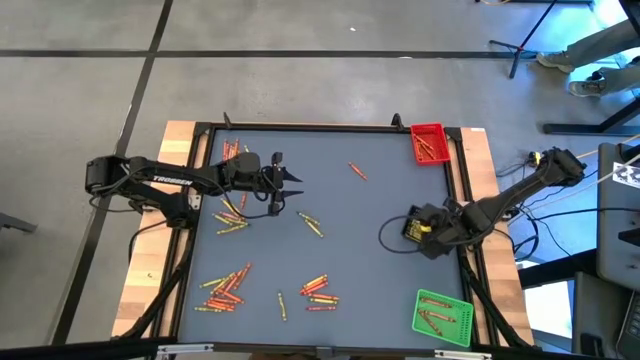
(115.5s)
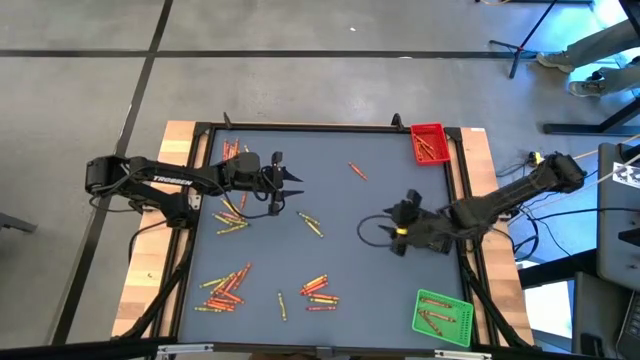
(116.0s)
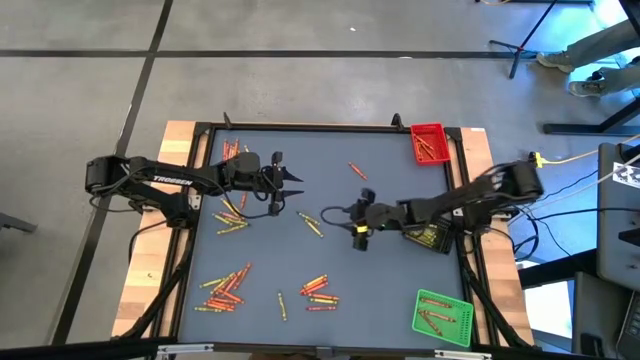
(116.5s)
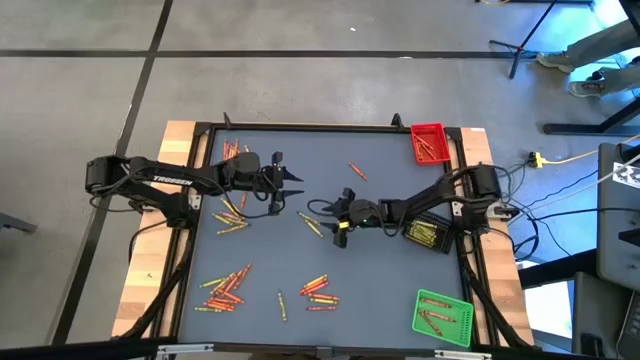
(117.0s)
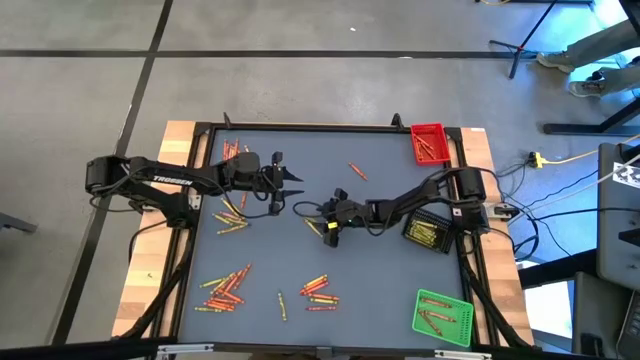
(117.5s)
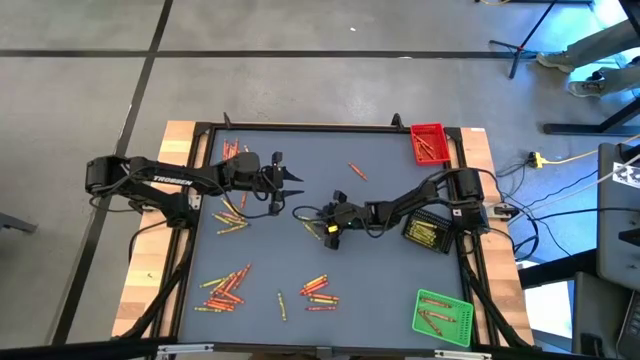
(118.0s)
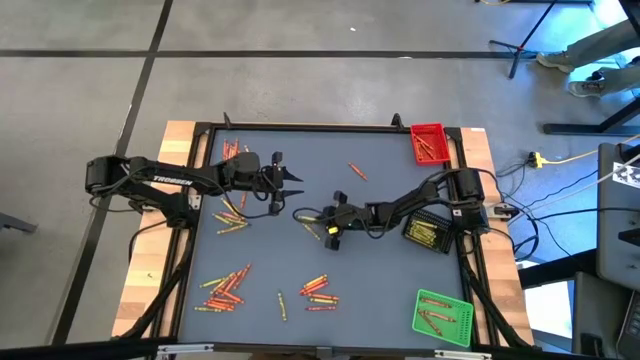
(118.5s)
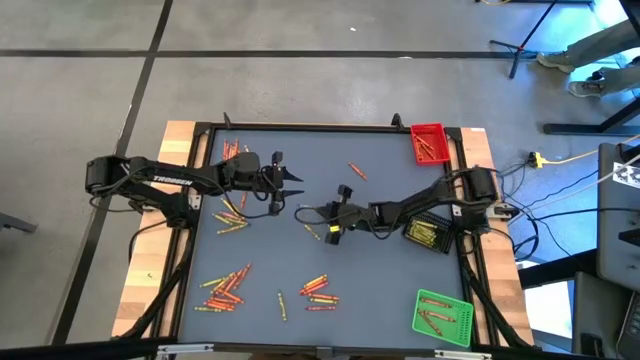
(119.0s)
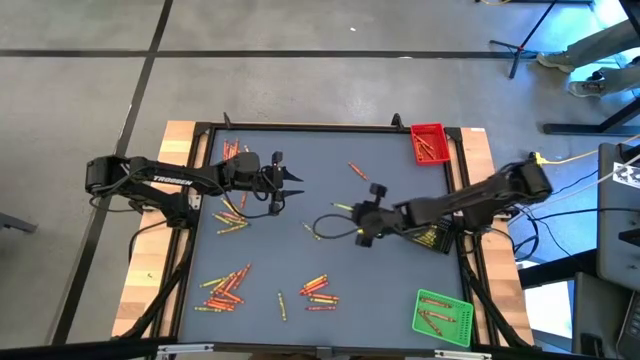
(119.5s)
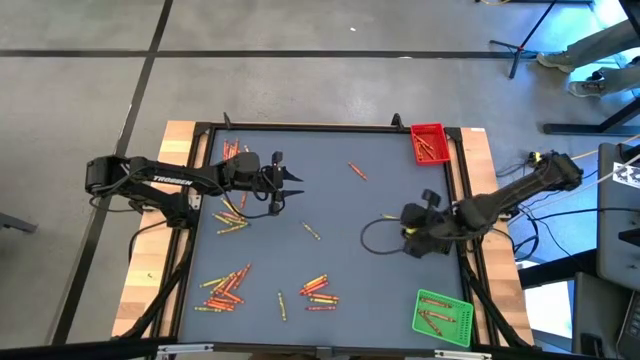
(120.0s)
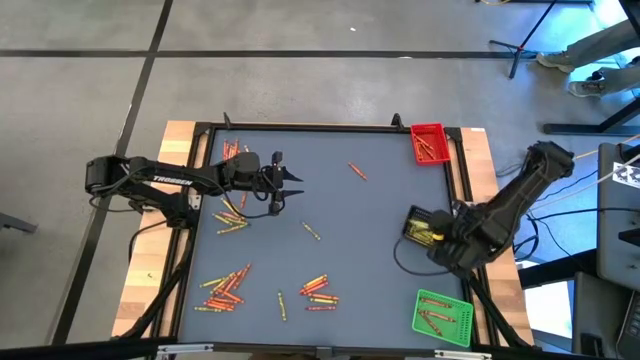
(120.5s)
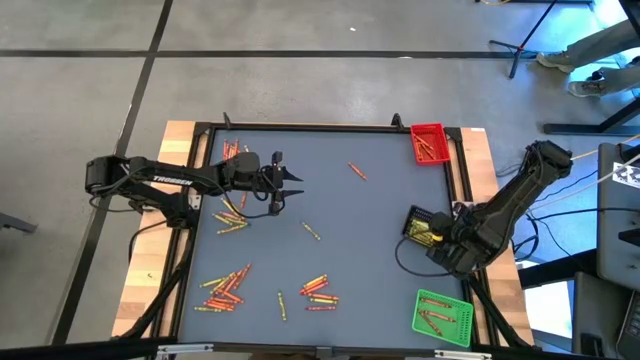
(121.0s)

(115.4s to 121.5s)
Task: Sort crayons
Put the green crayon into the black basket

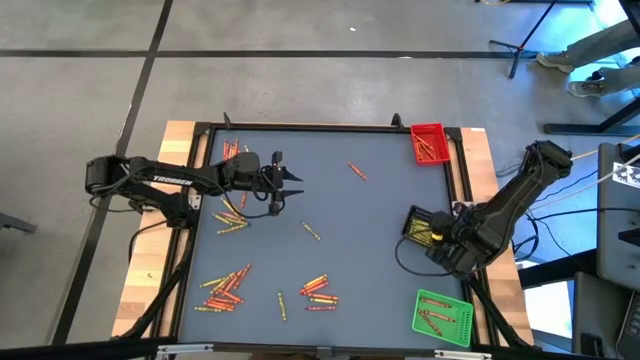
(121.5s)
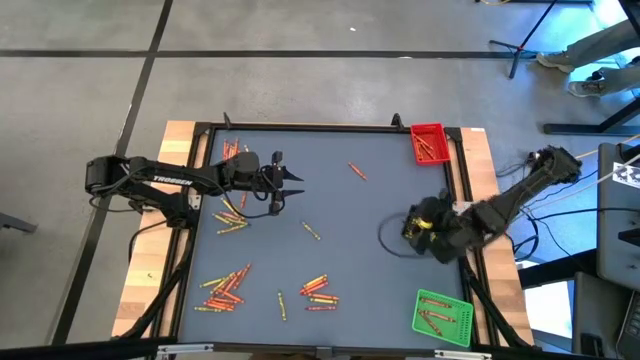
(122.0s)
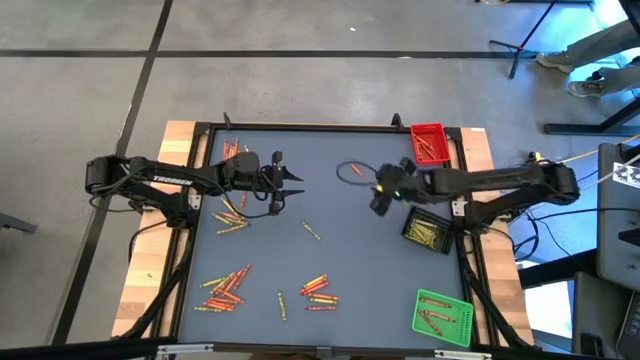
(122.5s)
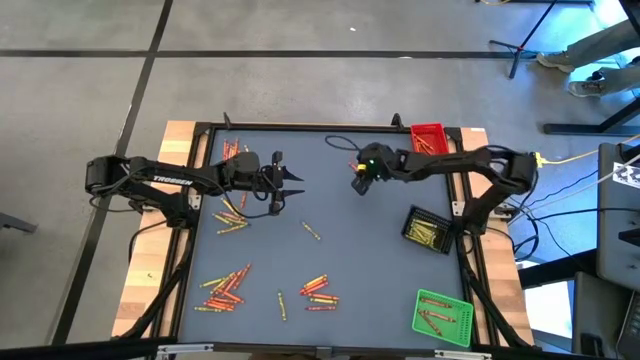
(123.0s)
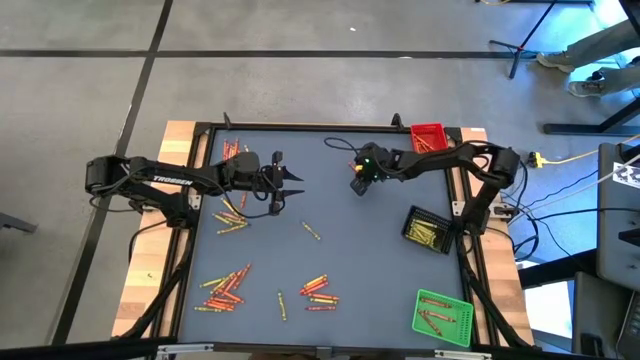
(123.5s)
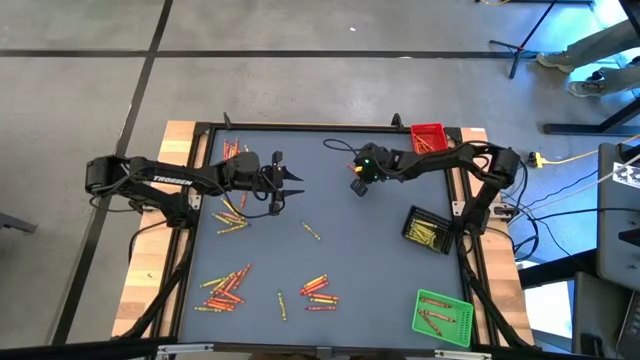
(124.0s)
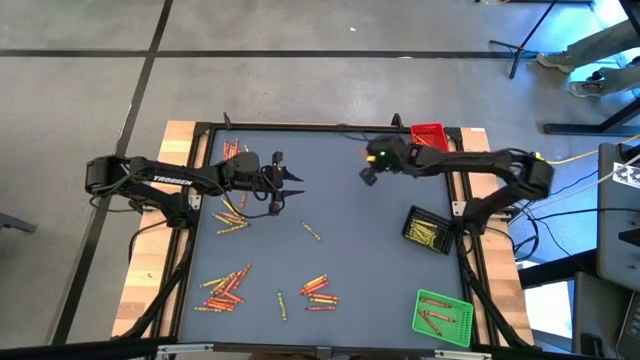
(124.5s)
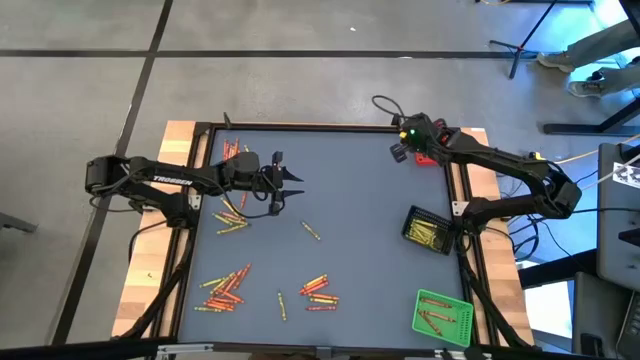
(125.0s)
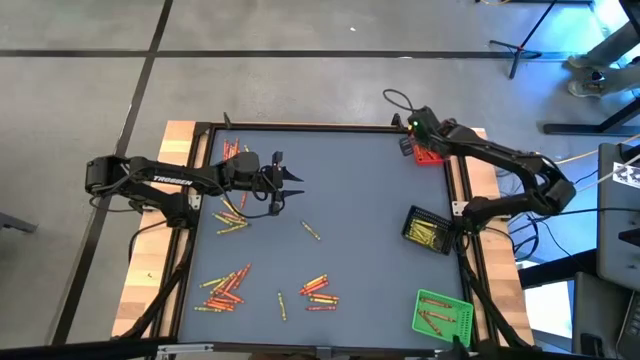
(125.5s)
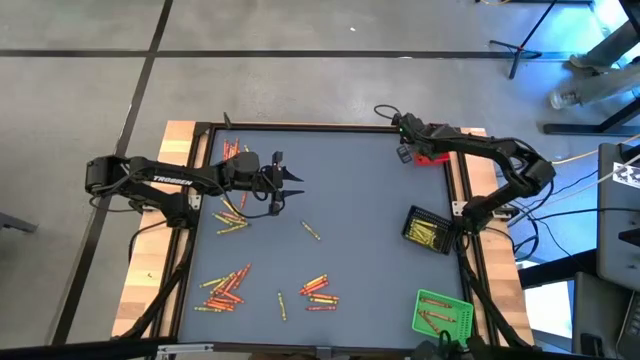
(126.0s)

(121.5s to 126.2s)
Put the orange crayon into the red basket

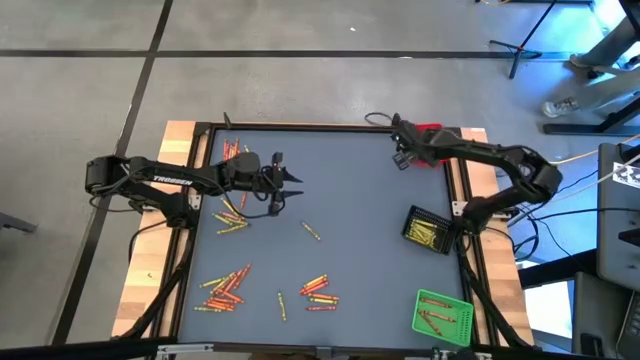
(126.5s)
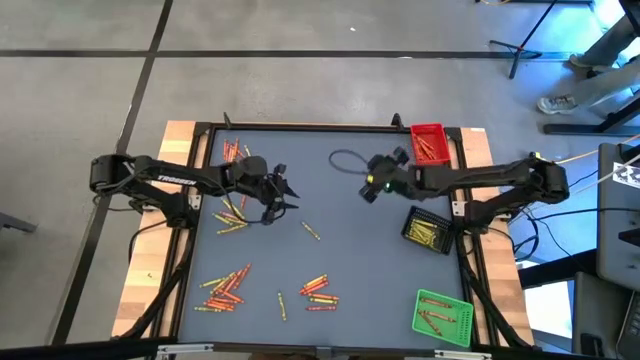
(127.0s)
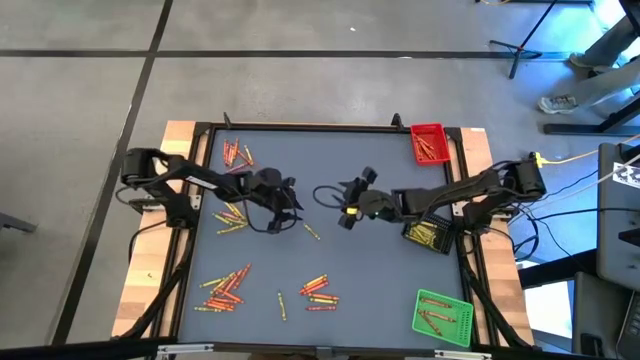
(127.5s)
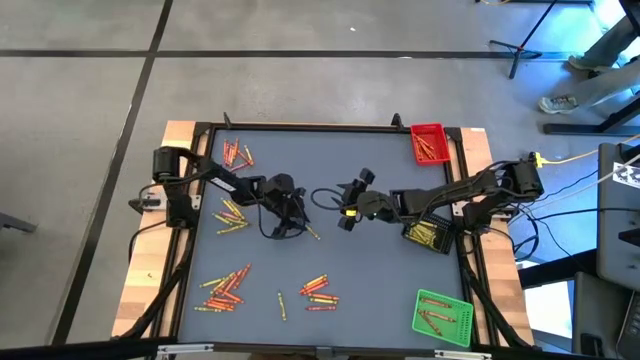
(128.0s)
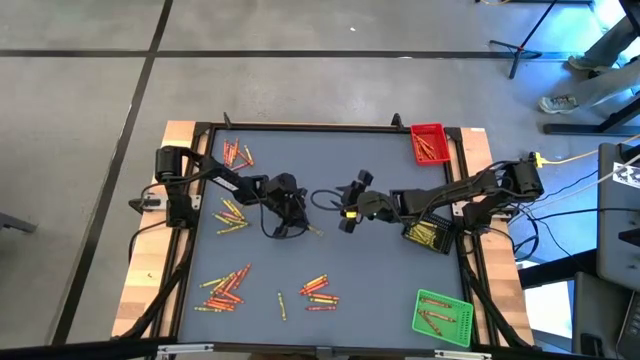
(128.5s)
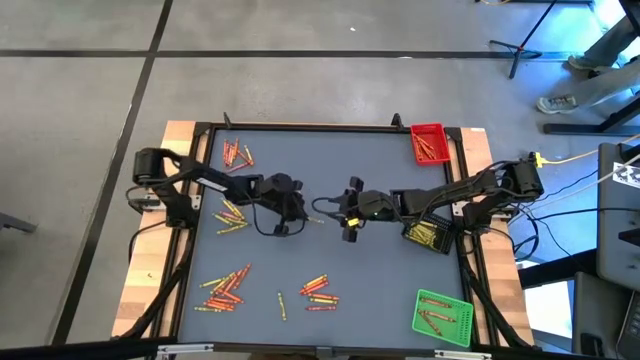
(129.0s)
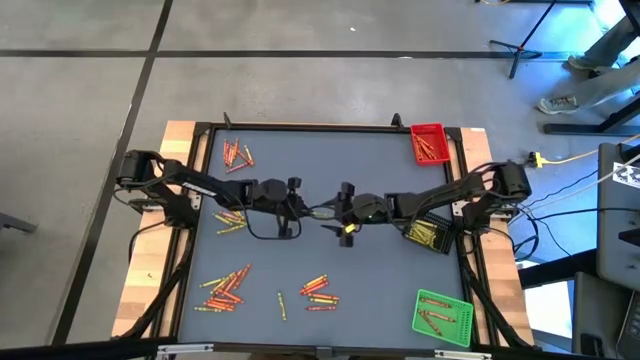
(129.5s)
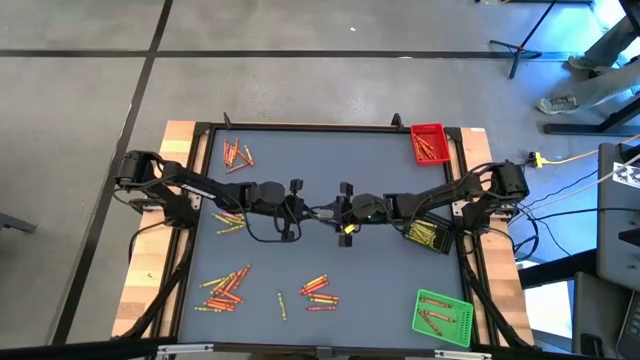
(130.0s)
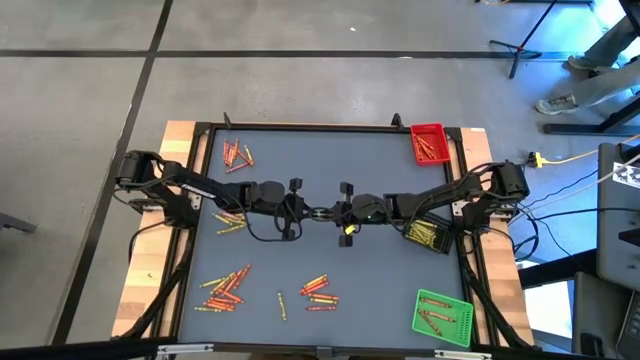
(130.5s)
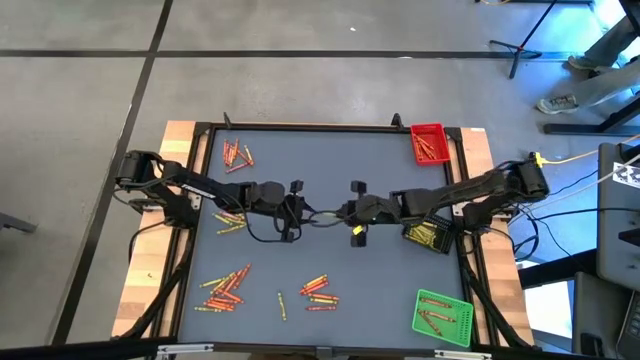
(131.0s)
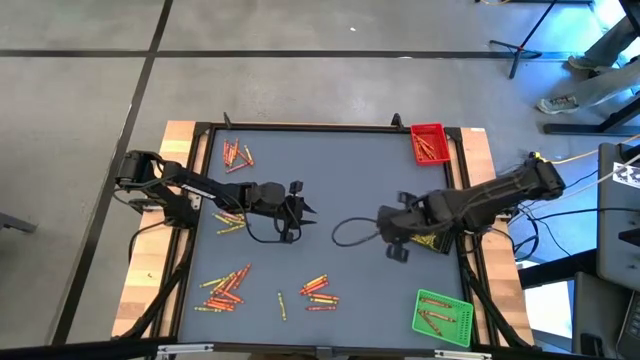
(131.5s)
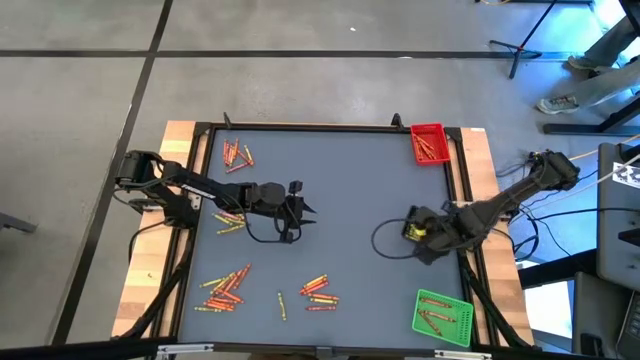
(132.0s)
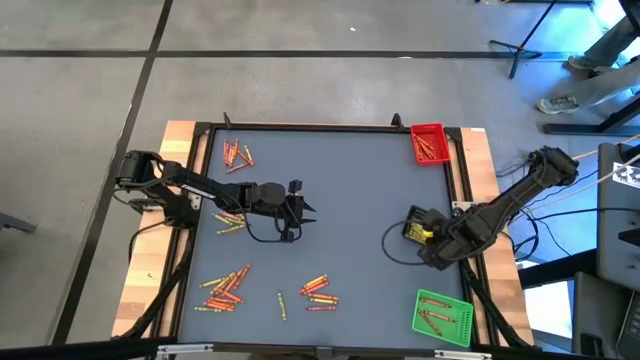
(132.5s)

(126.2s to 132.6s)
Put the green crayon into the black basket

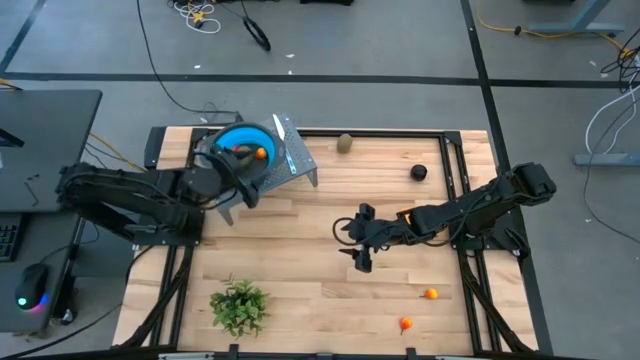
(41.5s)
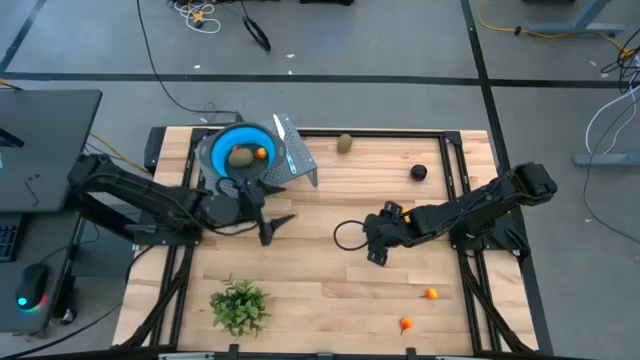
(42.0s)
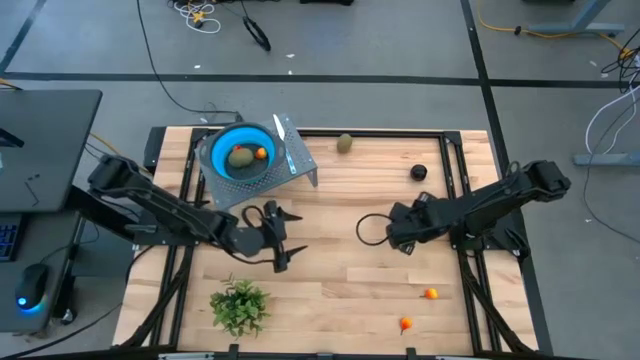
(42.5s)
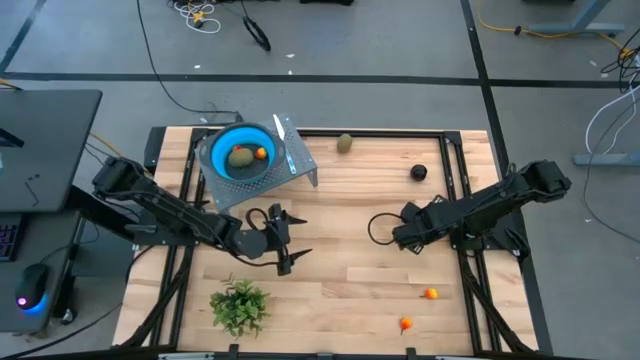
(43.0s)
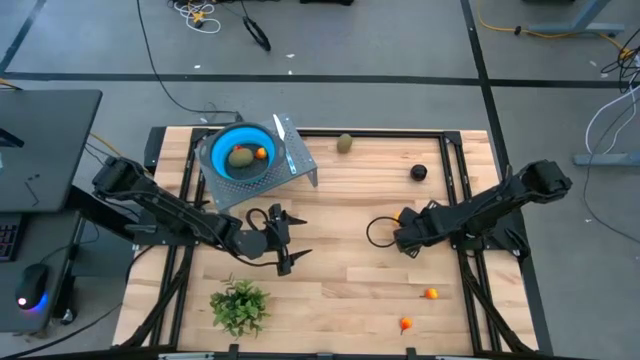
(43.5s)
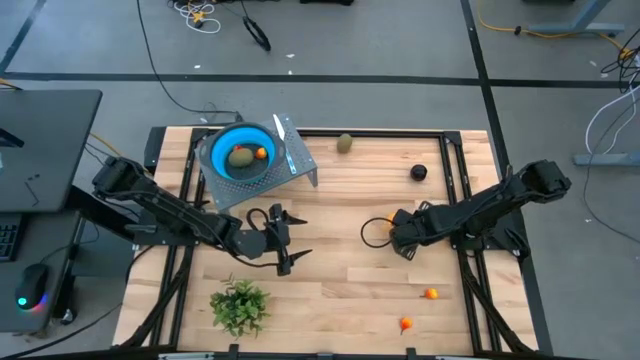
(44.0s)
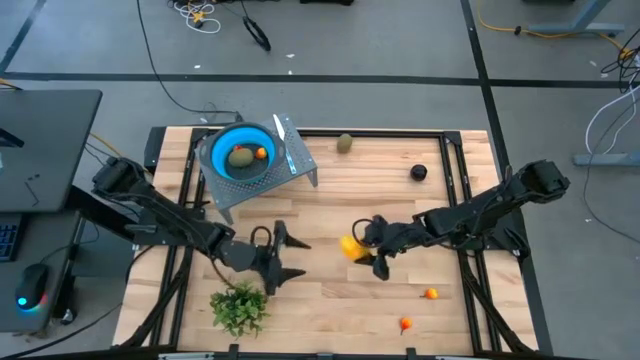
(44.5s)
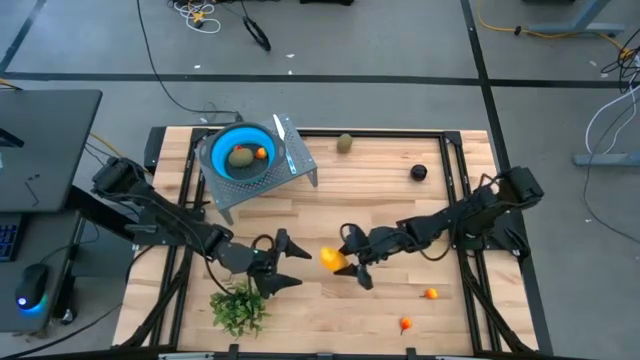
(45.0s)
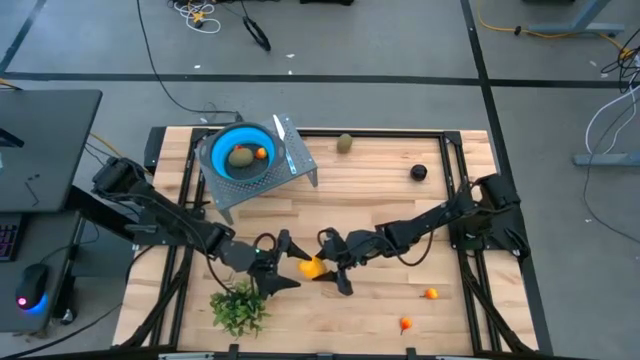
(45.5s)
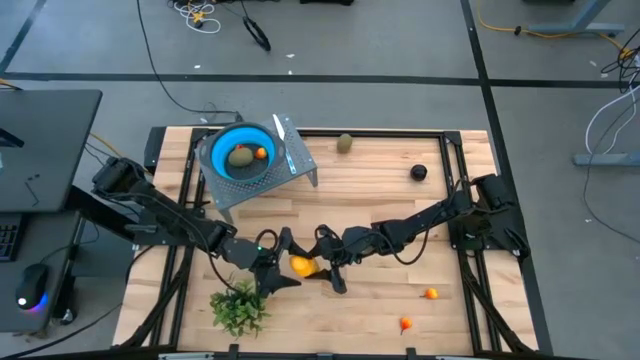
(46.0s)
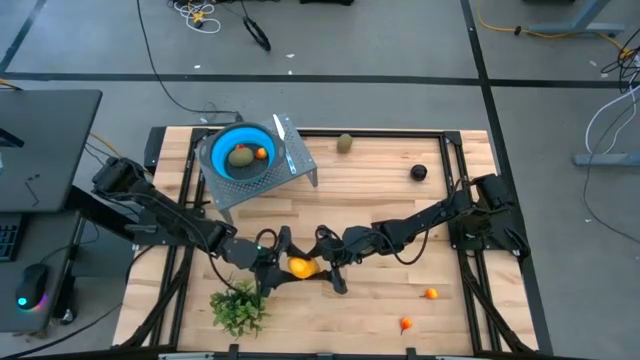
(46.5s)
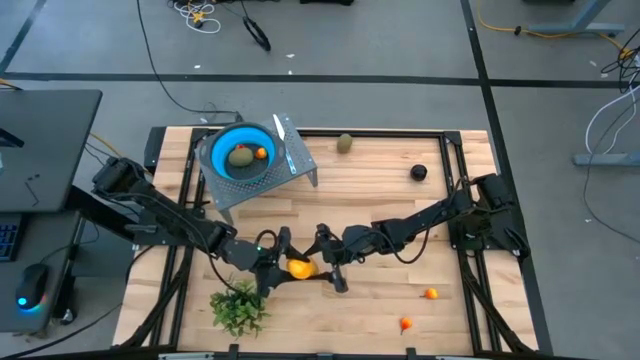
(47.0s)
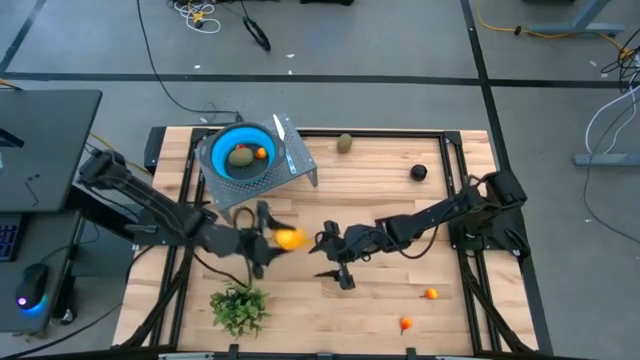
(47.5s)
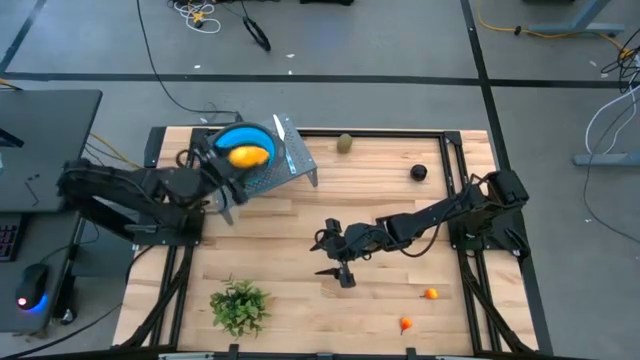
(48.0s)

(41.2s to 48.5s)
Task: Pick & Place Fruit
Put the yellow mango into the blue strainer bowl on the shelf
